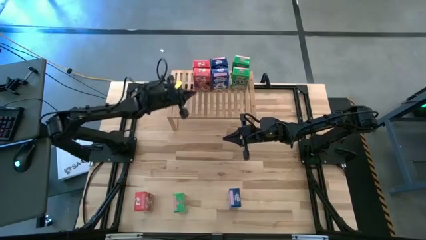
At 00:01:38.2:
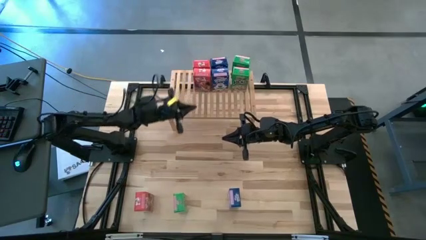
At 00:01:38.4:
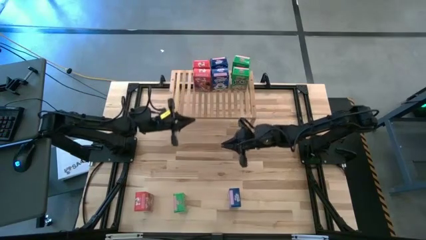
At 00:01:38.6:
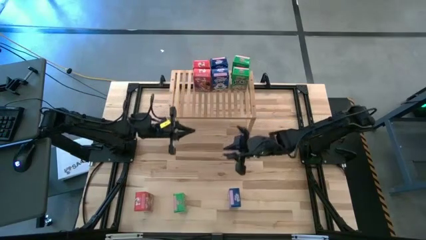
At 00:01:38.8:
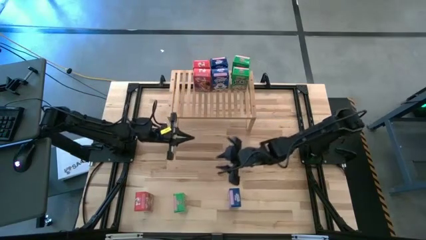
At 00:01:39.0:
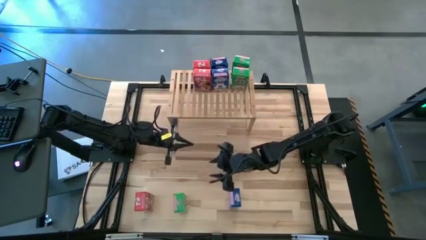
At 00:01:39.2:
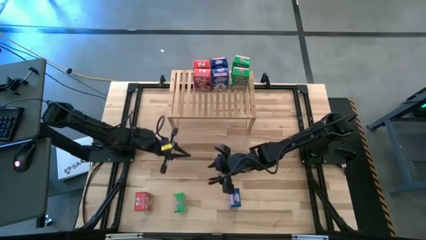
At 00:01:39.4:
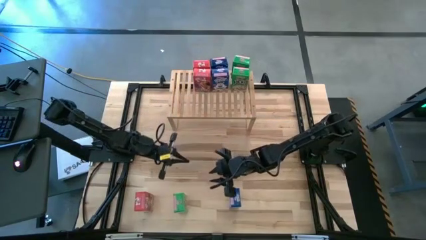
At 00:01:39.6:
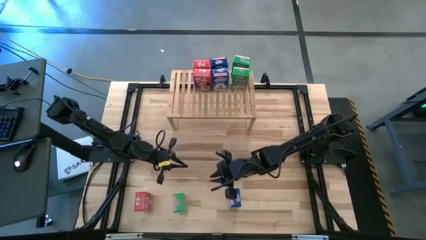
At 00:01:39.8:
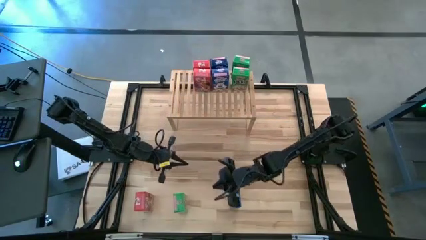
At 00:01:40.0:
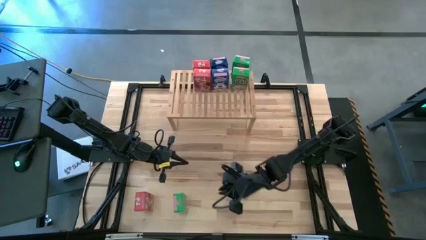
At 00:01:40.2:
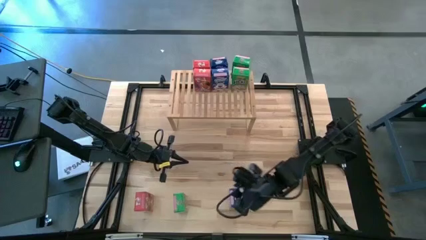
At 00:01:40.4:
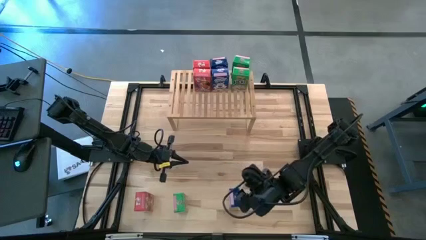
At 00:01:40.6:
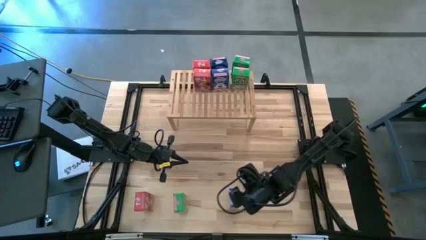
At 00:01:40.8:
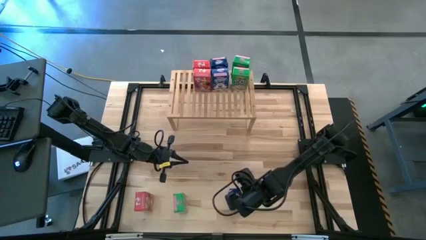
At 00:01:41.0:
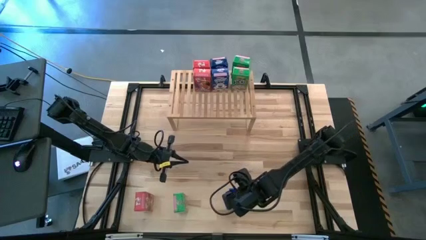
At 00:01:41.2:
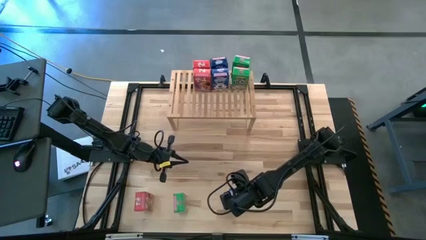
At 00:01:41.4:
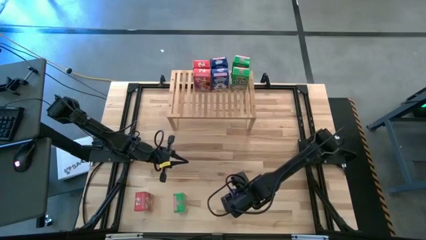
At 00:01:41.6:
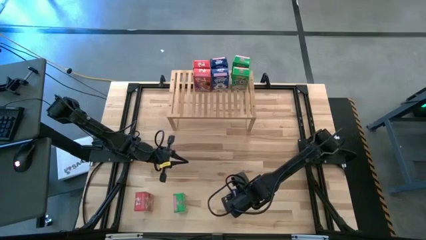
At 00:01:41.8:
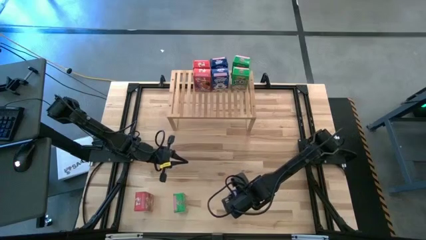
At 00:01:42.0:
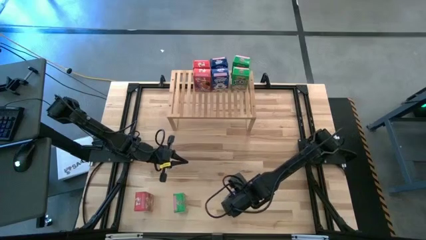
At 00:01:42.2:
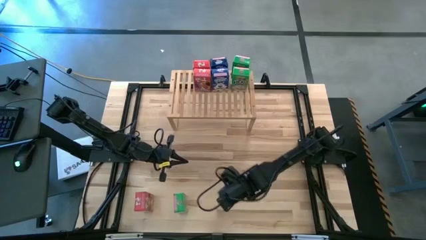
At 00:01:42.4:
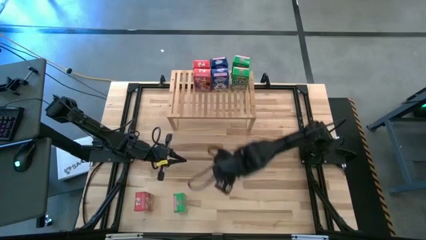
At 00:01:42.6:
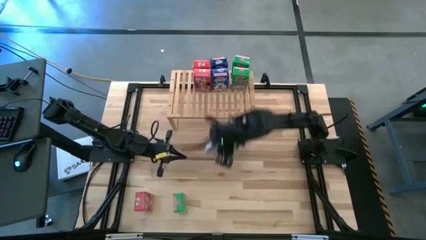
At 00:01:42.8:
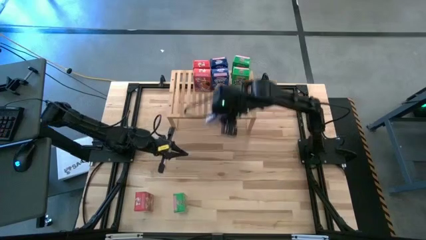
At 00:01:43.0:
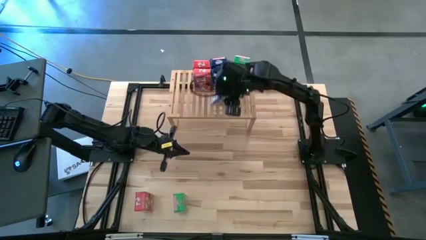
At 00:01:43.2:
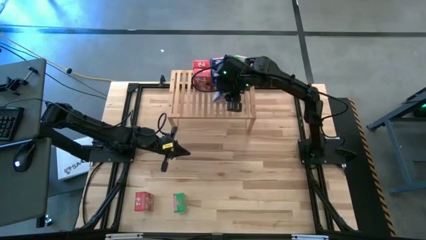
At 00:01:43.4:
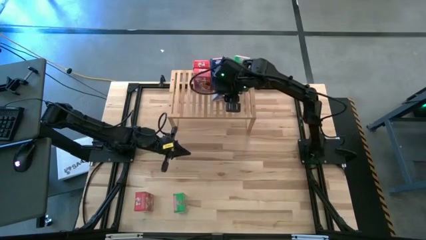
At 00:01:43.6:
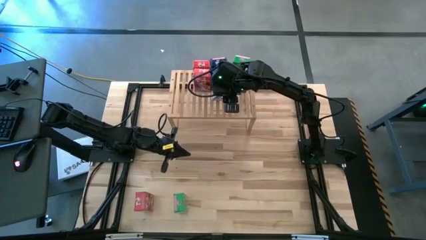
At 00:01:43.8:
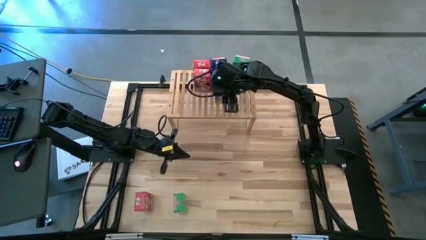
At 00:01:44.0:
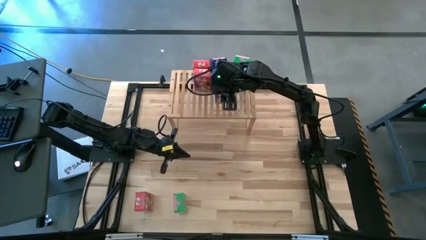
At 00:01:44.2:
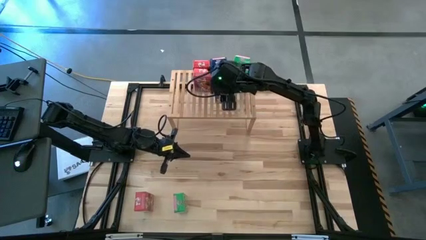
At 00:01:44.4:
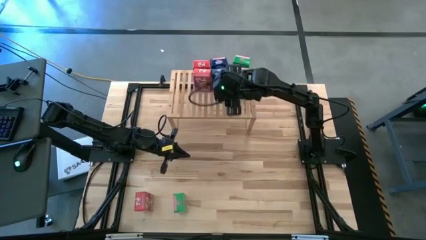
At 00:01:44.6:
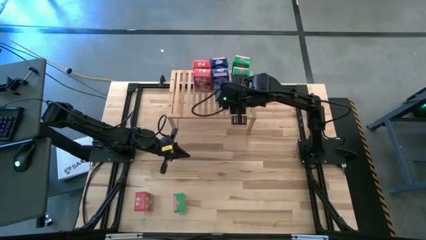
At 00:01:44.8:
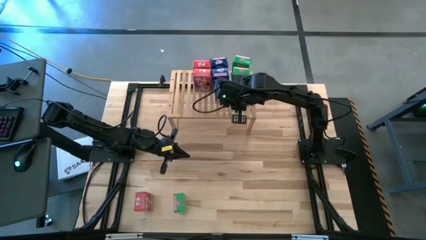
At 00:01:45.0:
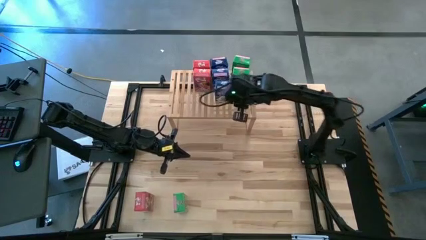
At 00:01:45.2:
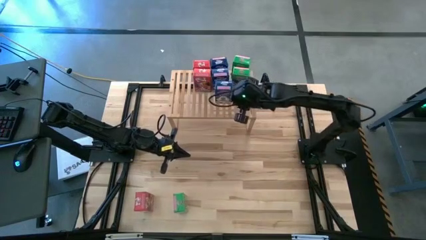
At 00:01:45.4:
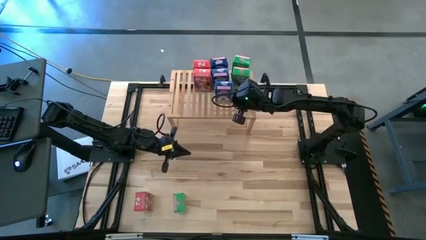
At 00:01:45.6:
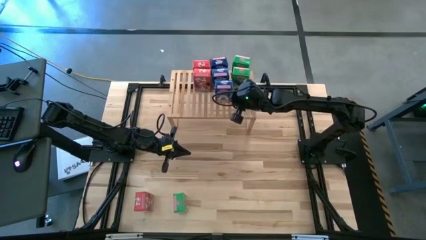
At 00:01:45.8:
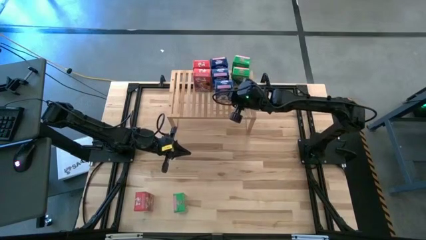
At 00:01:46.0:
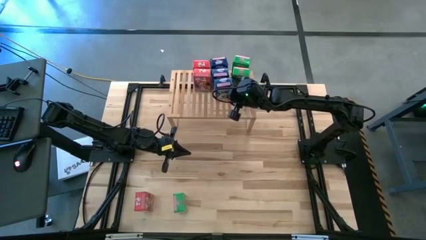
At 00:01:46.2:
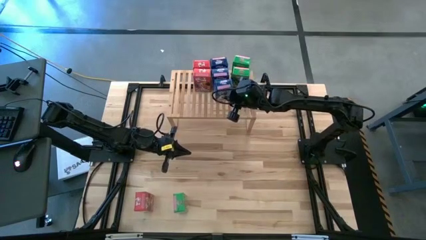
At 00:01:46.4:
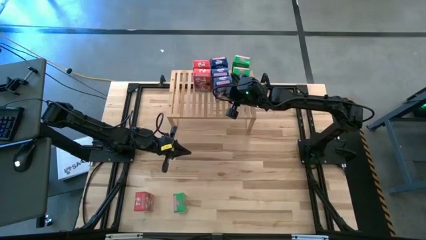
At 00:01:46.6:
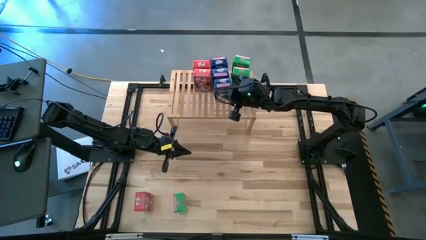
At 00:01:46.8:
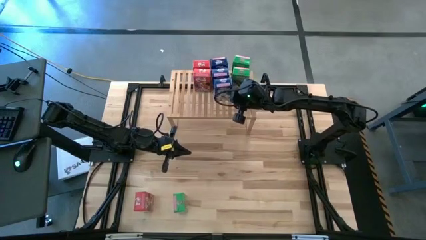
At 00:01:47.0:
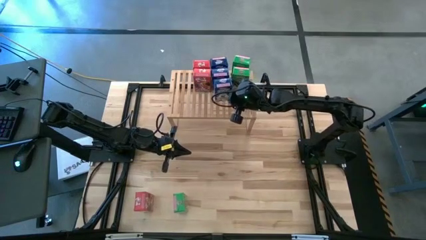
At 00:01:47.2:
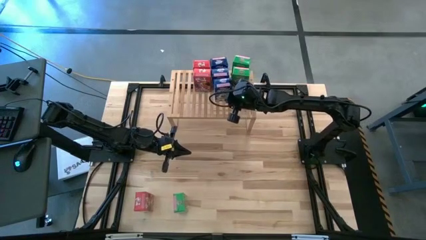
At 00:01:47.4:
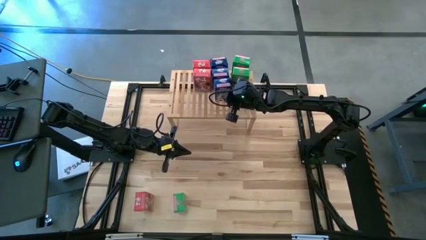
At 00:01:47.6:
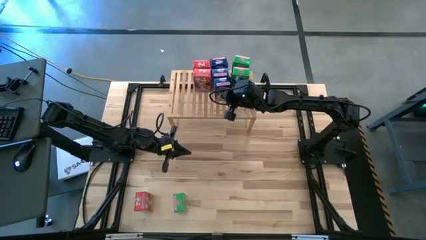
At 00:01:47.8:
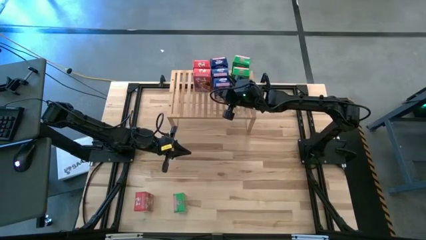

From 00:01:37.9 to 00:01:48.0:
Task: Stack cereal on shelf
Put the blue cereal box aligned with the other blue cereal boxes on the shelf

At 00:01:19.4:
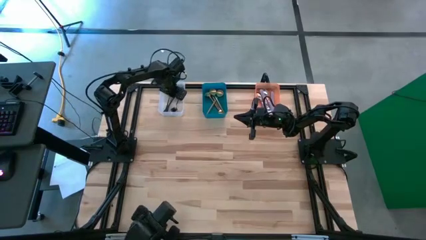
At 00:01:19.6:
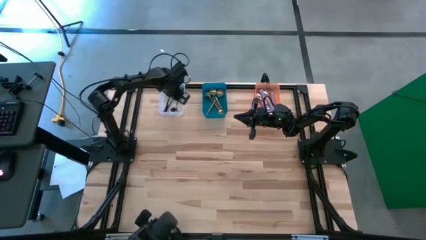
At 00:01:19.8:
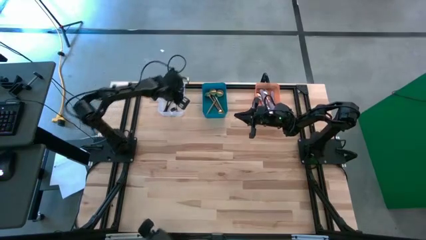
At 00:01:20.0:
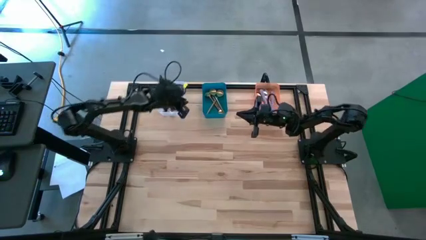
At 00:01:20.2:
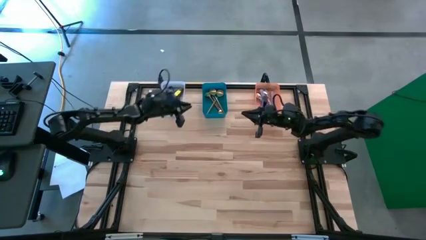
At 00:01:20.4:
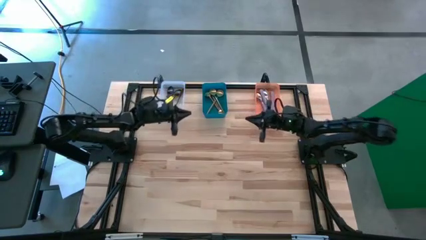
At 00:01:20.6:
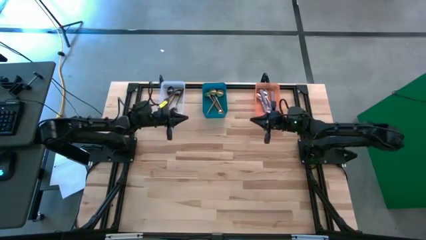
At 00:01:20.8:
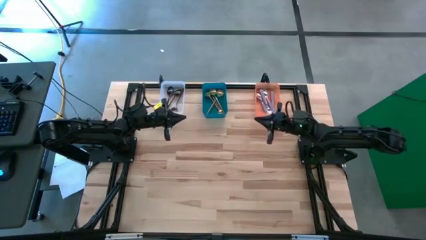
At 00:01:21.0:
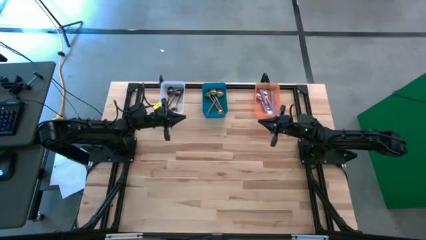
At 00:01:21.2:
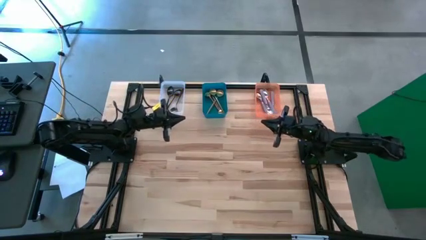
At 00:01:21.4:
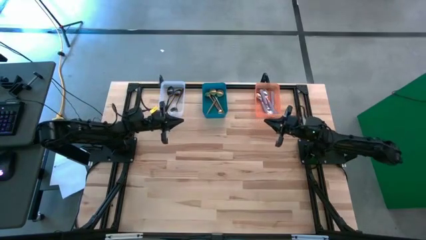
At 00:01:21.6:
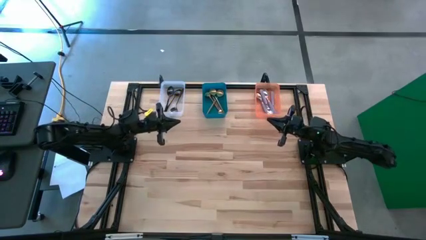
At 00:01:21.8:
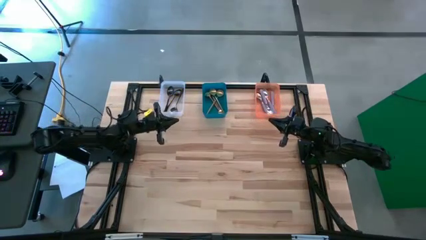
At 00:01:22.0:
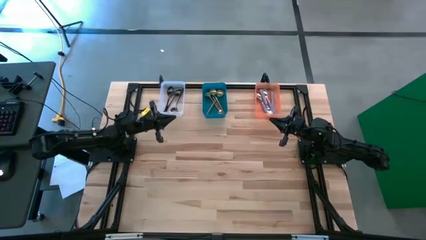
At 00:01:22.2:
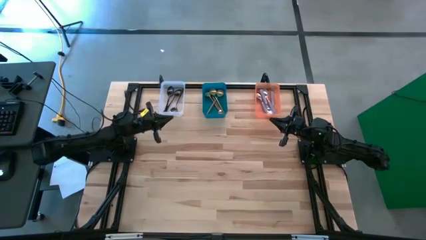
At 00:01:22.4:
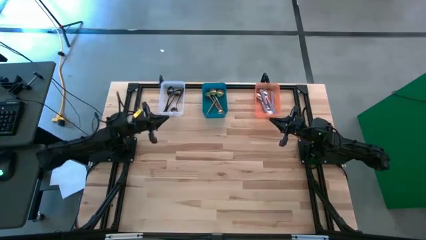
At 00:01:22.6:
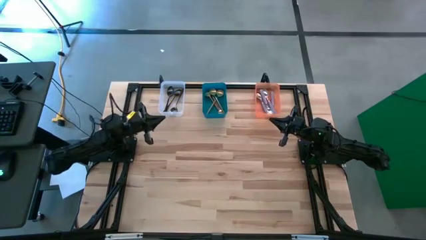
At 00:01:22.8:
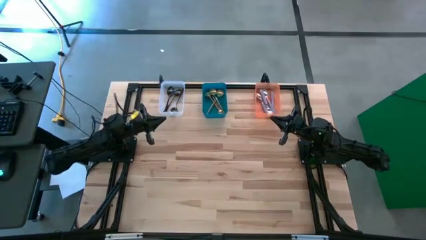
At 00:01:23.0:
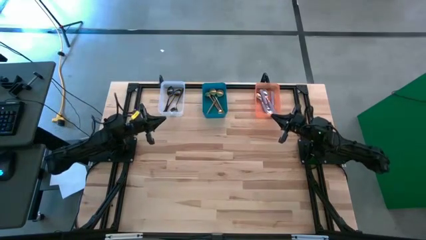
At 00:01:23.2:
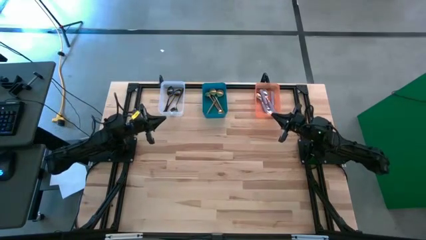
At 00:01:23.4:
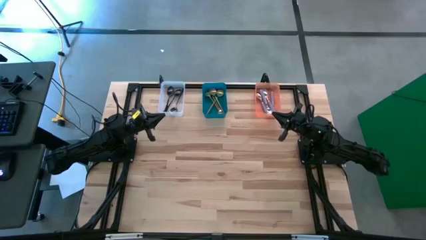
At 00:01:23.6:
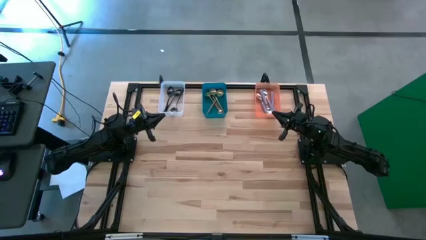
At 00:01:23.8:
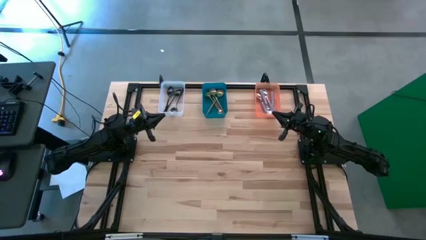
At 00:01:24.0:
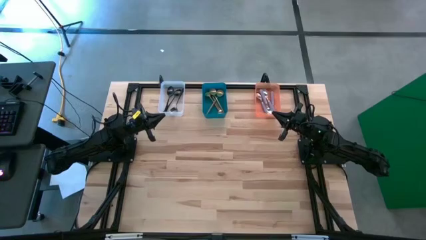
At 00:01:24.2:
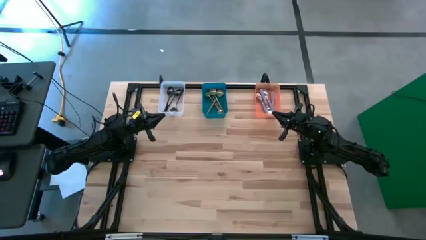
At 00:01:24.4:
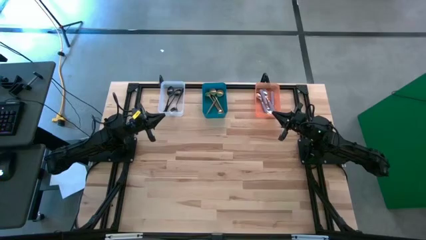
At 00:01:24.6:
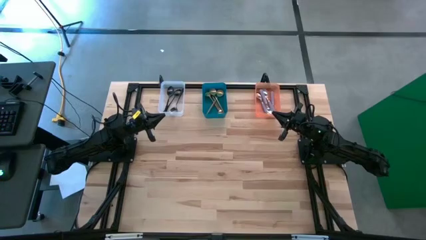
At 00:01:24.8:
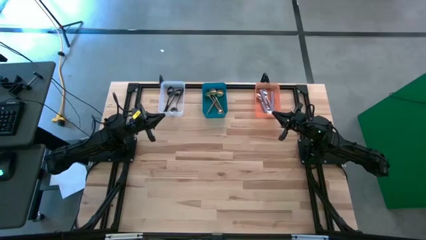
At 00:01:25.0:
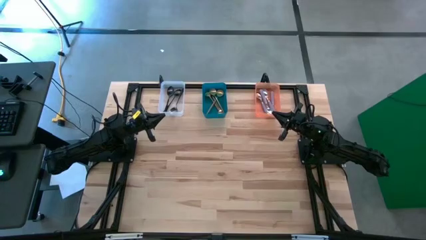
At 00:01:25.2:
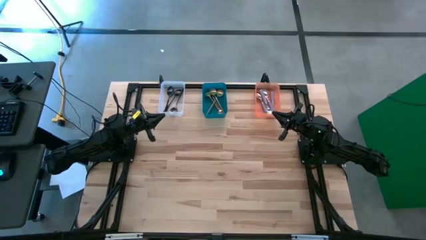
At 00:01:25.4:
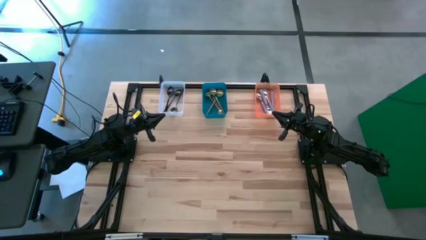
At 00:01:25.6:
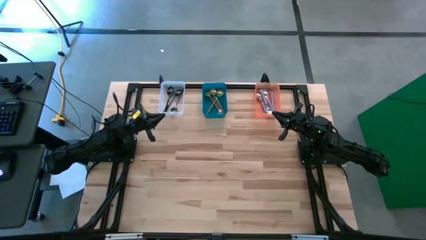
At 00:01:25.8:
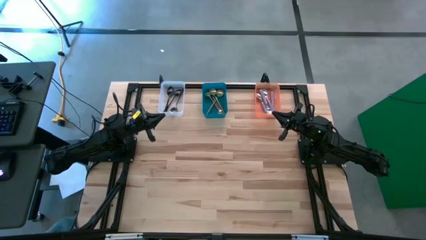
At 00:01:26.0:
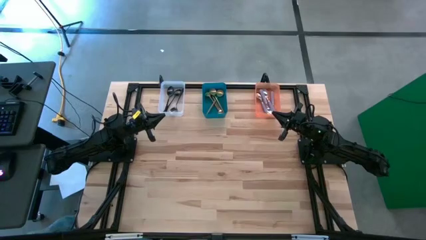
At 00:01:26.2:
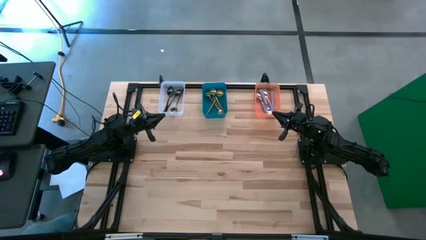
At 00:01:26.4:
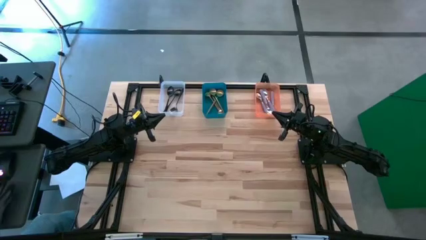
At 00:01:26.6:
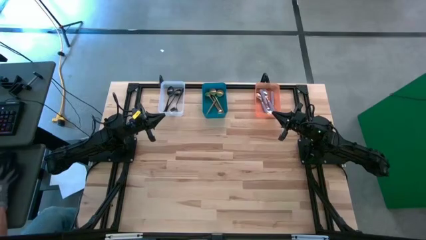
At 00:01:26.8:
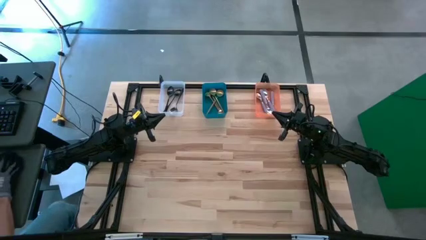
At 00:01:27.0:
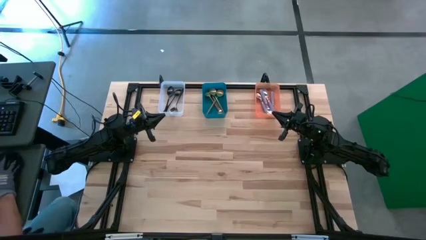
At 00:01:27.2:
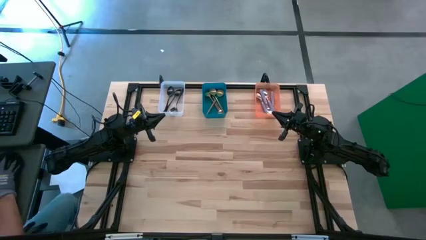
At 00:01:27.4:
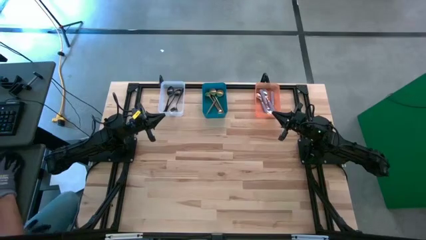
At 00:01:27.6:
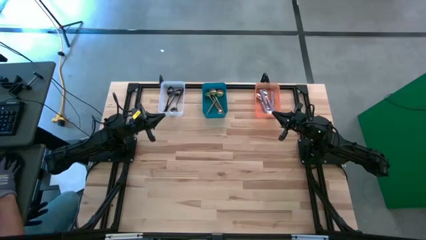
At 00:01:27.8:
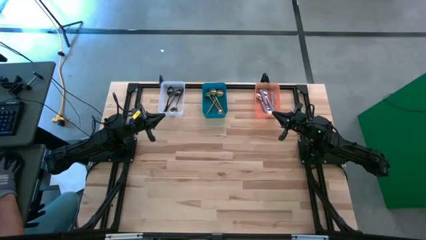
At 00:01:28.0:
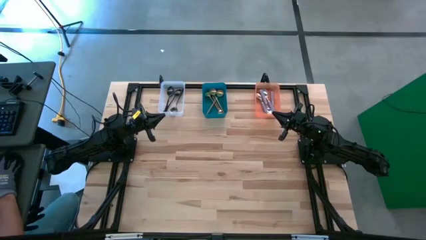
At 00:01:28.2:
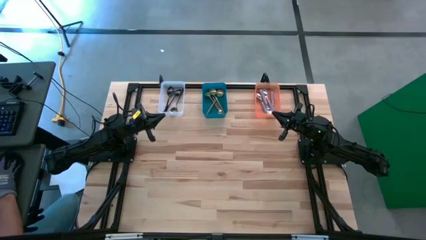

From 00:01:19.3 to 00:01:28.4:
Task: Sort silverware by color (type)
Return to Home Position
